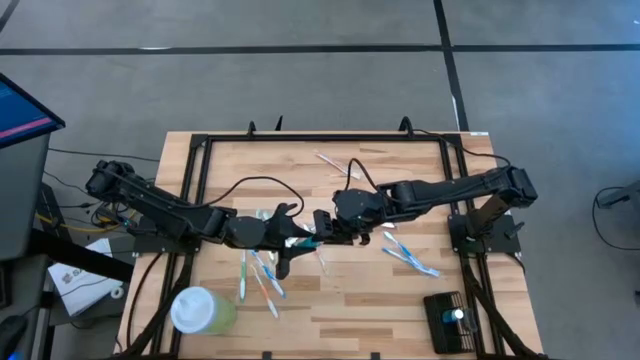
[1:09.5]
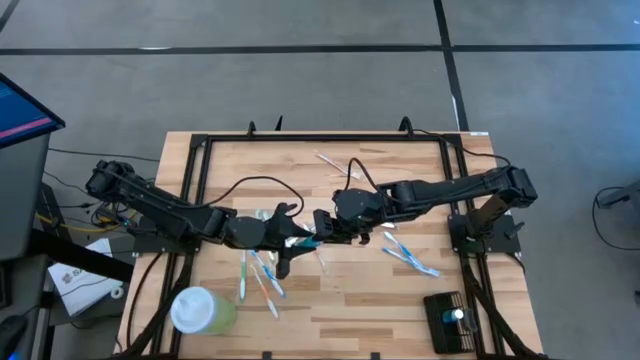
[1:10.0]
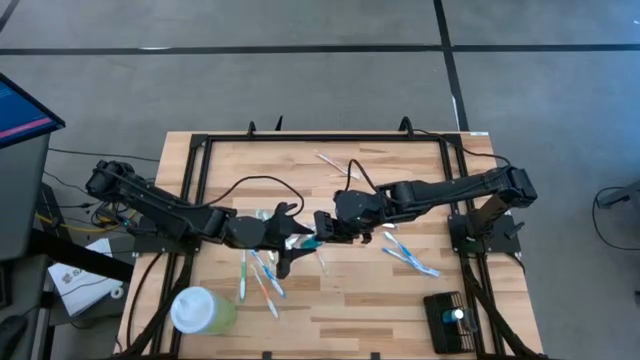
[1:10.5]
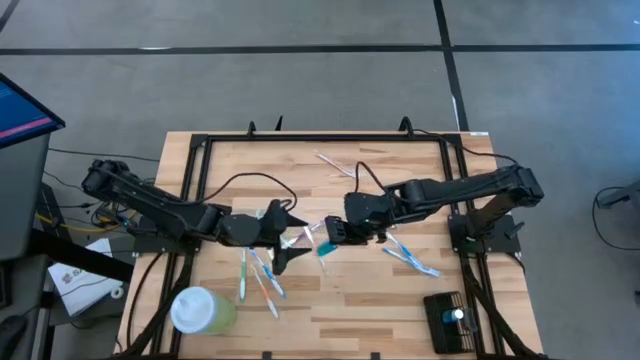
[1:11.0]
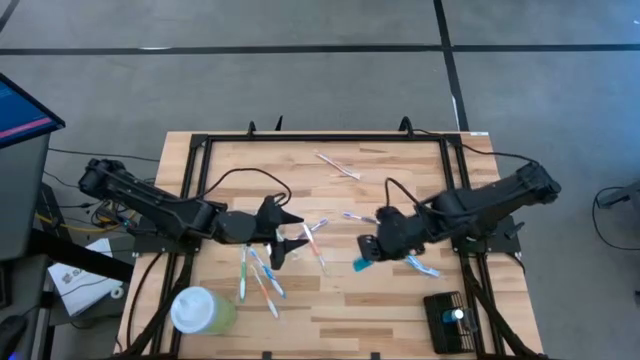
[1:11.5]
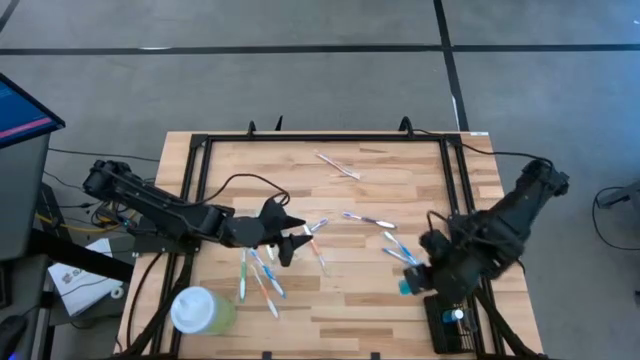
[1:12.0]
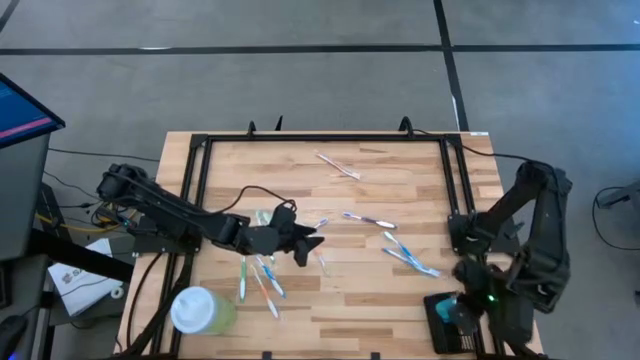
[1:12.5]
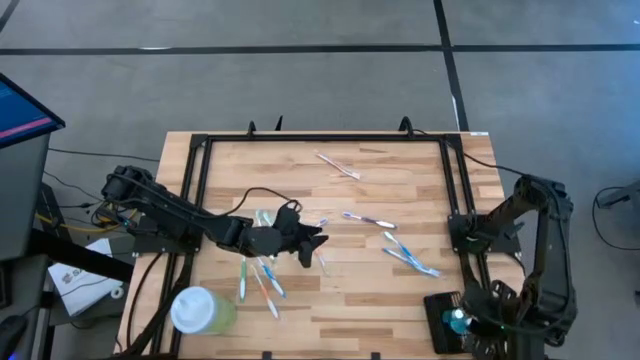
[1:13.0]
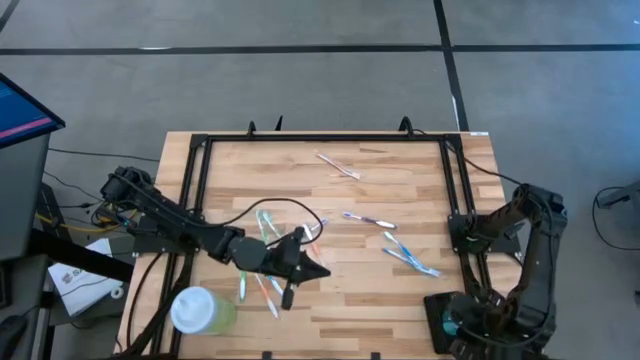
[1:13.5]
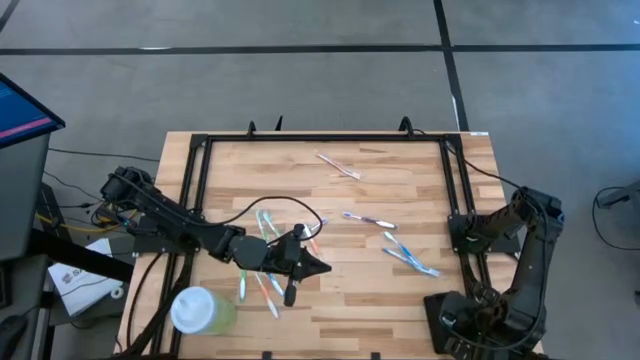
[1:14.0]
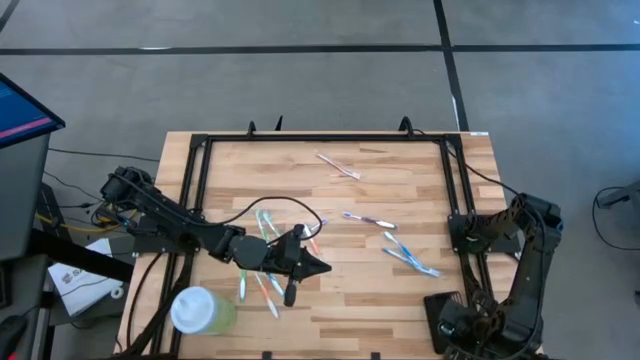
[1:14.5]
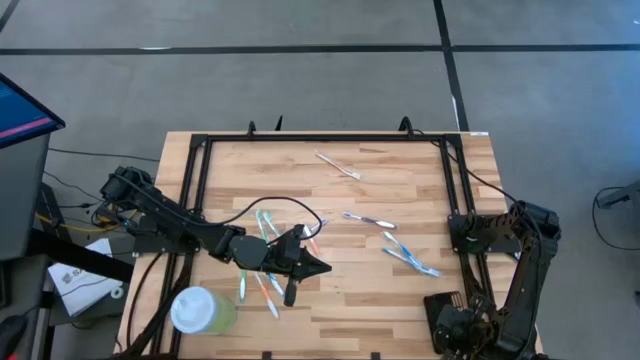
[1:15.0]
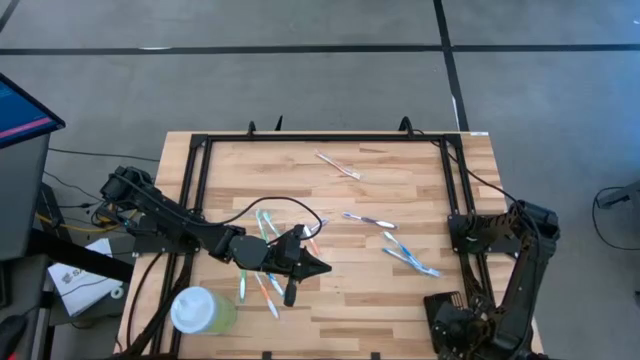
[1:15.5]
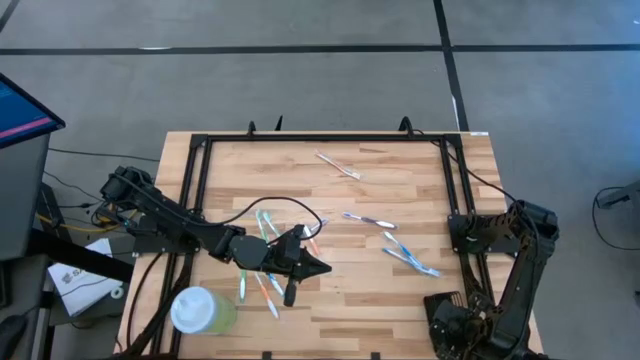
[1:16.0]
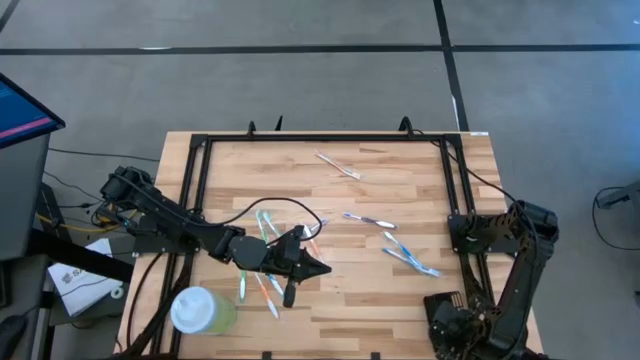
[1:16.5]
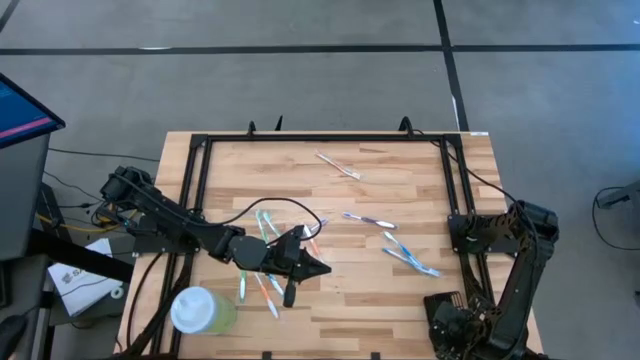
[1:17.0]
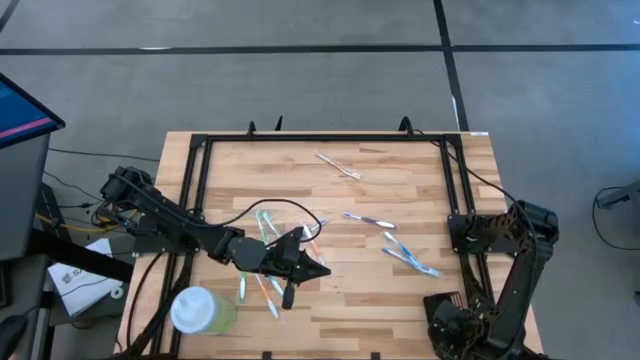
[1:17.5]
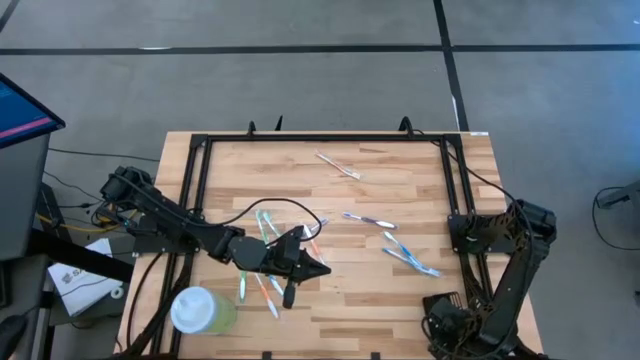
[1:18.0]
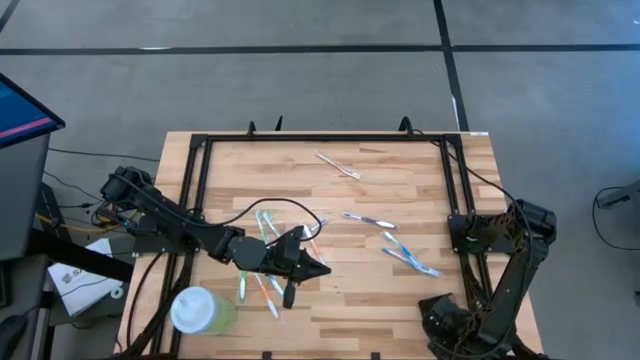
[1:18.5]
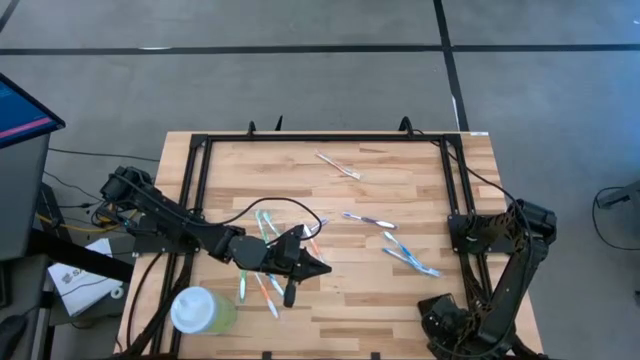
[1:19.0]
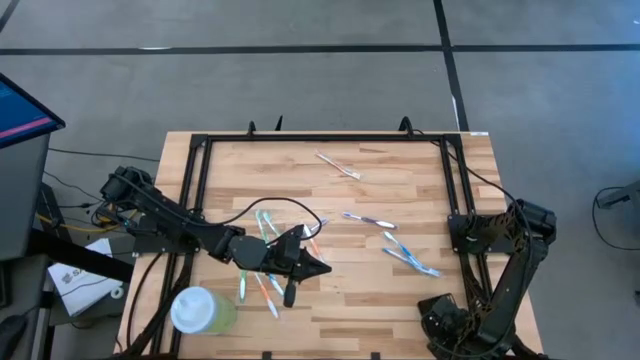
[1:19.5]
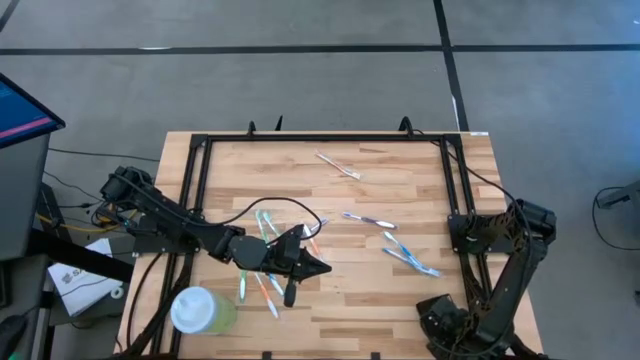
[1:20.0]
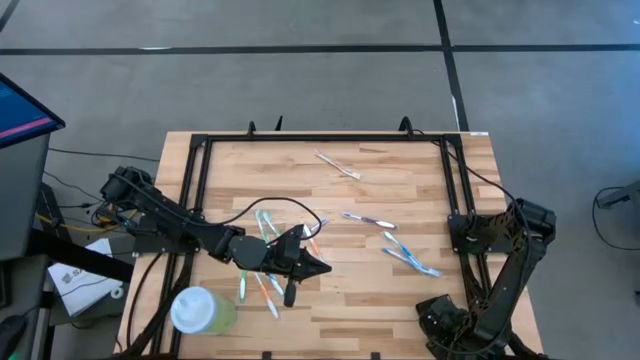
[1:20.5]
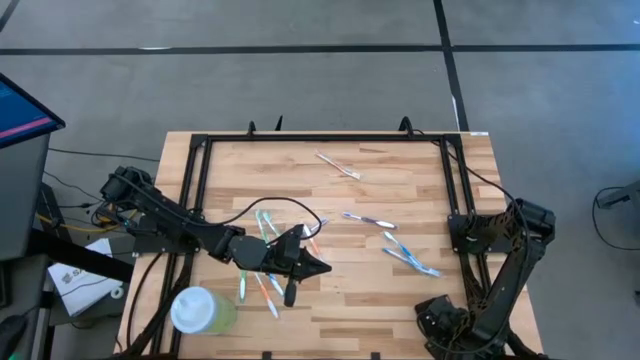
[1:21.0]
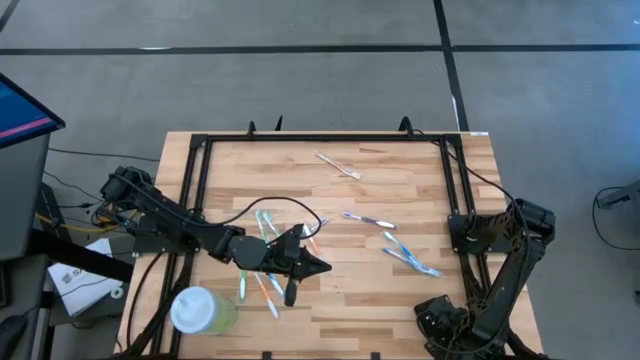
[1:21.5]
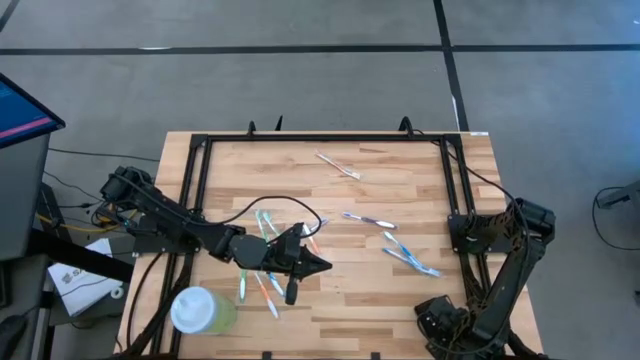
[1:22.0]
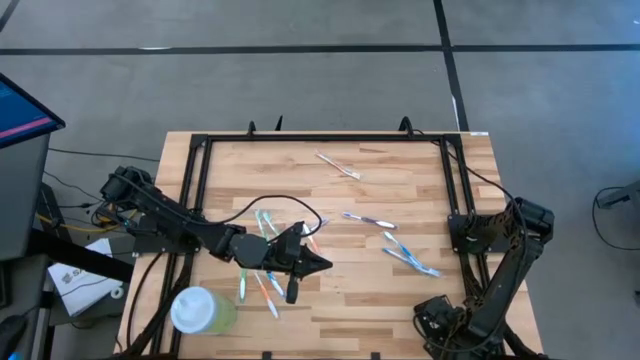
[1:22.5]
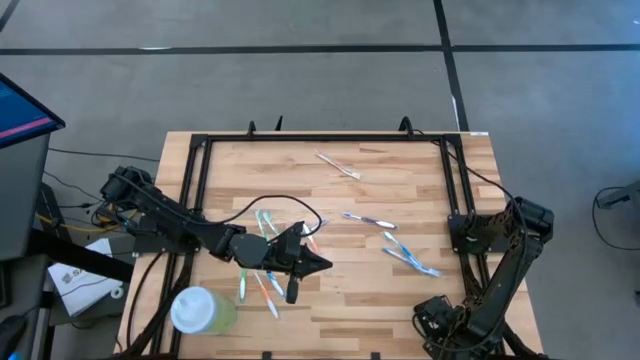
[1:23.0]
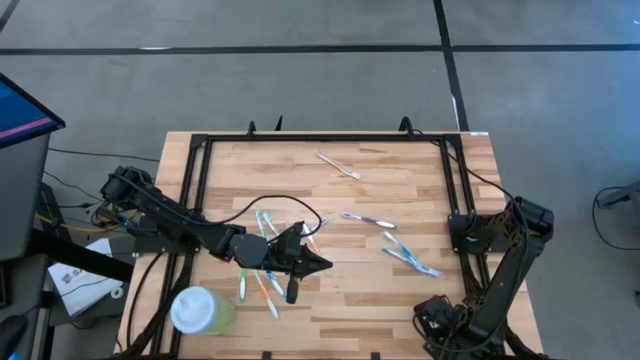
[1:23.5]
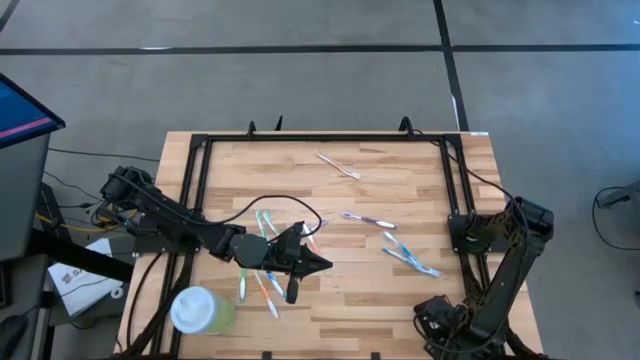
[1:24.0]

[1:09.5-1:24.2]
Task: Pick & Place toothbrushing station
Put the blue mouthwash bottle into the black organizer

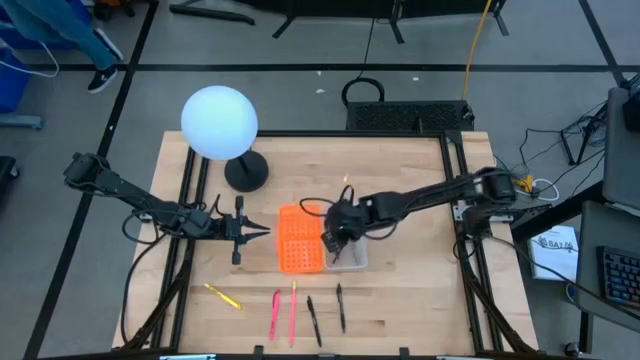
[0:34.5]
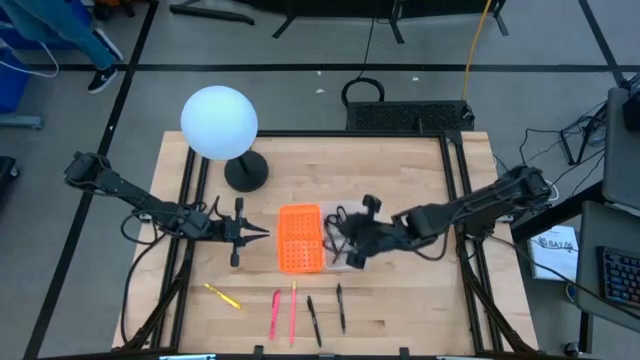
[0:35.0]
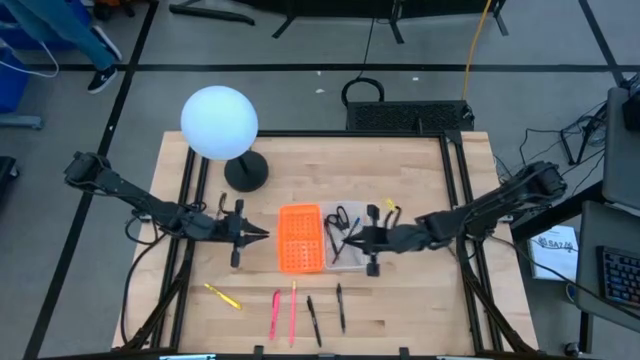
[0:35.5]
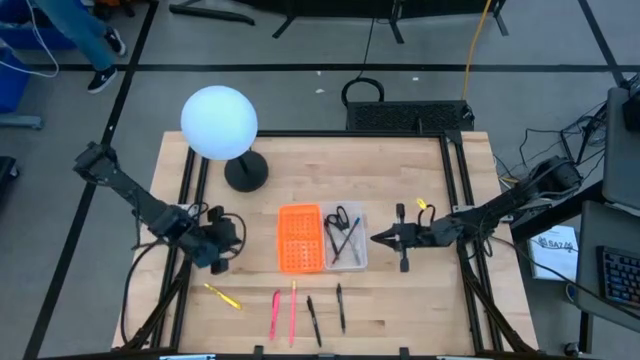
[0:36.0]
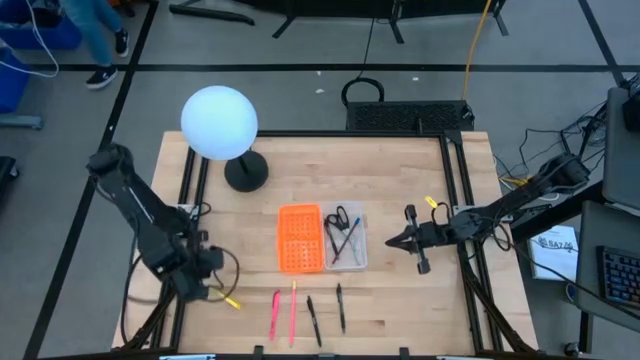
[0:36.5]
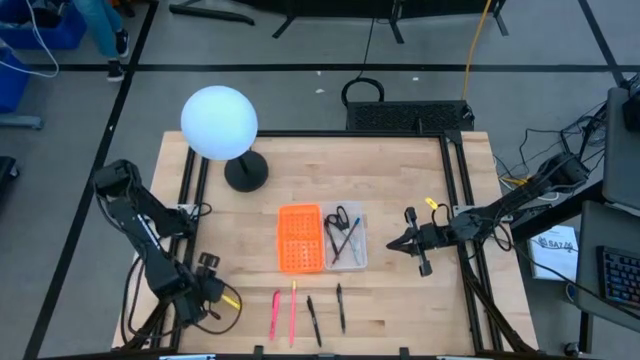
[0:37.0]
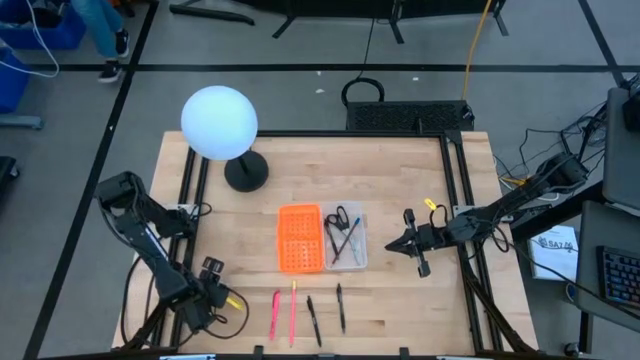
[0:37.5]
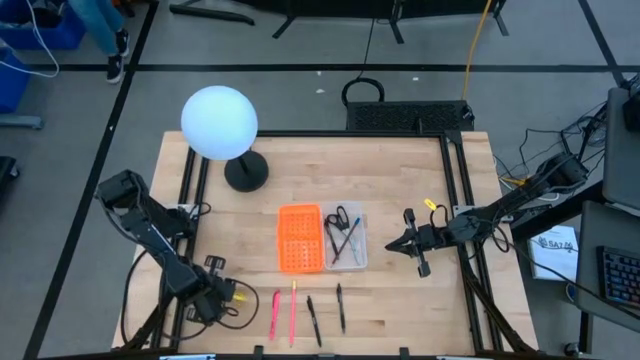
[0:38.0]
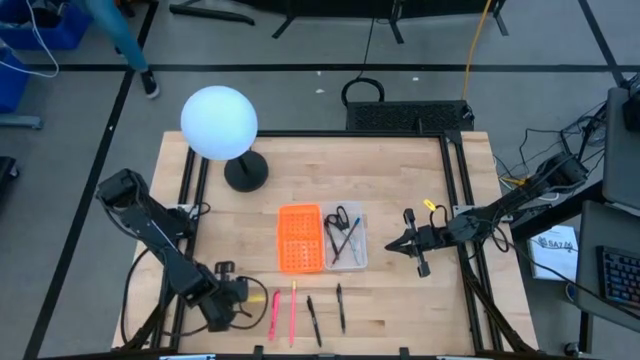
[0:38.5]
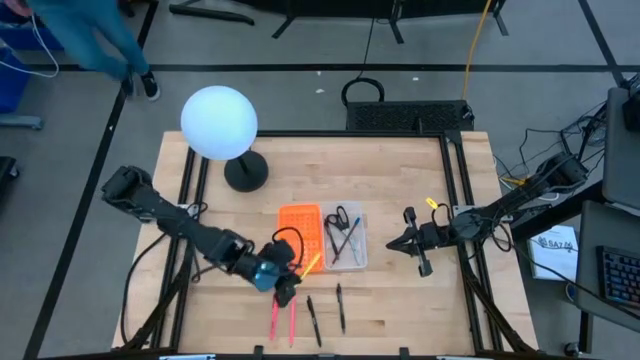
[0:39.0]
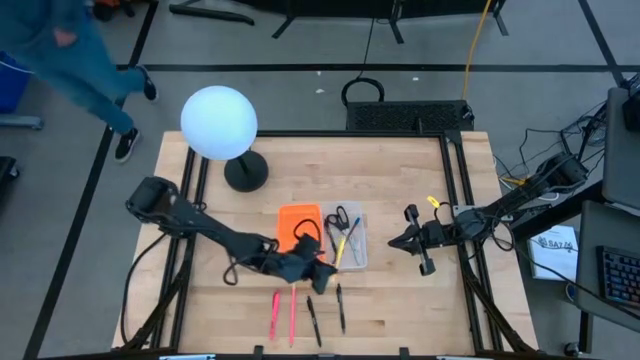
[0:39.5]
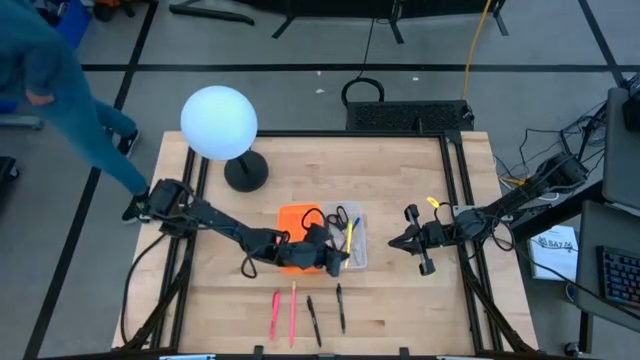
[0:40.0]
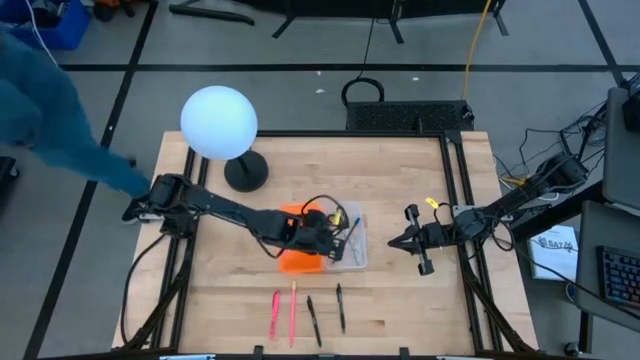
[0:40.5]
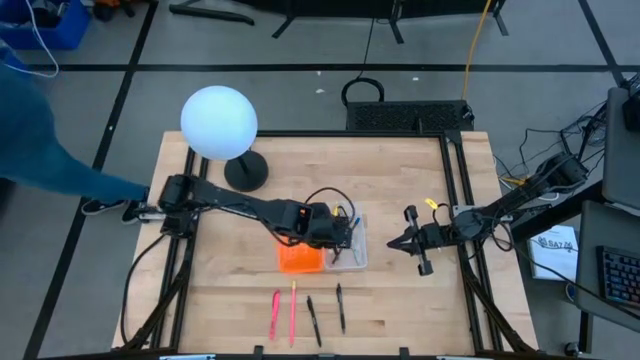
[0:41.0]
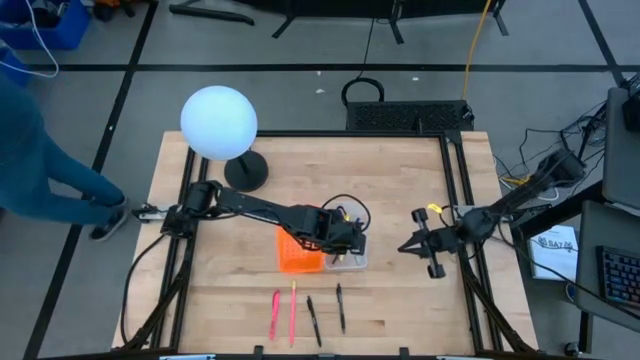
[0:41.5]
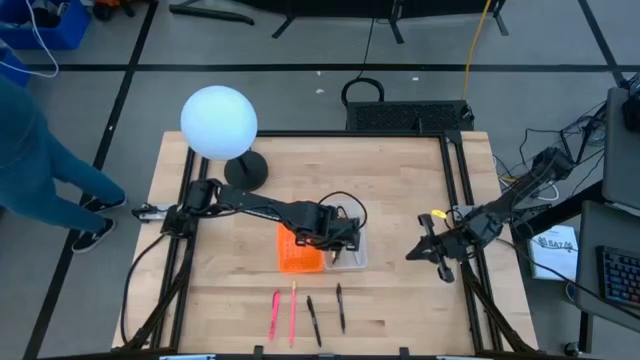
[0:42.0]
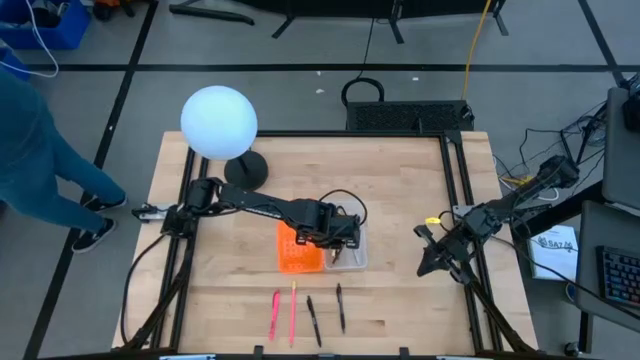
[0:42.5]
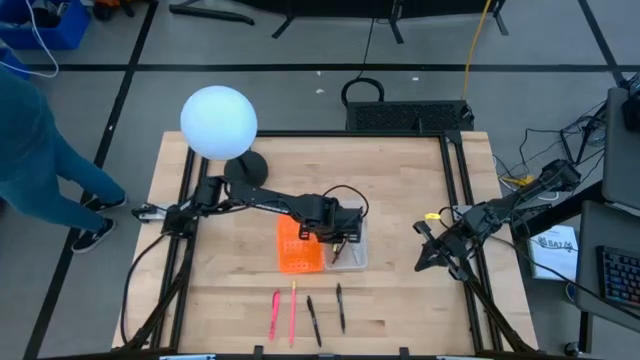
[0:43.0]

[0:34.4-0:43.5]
Task: Pick & place school supplies into a supply box
Put the yellow pen into the orange and white supply box
